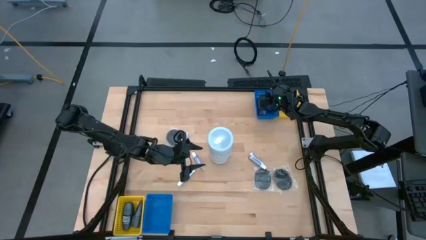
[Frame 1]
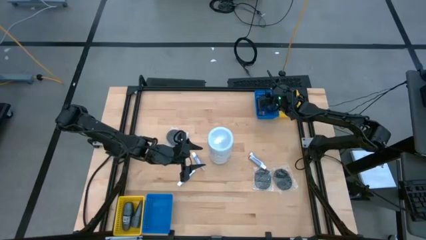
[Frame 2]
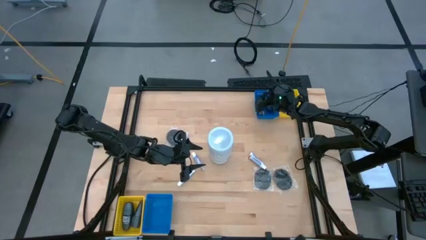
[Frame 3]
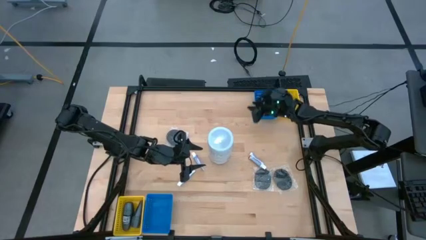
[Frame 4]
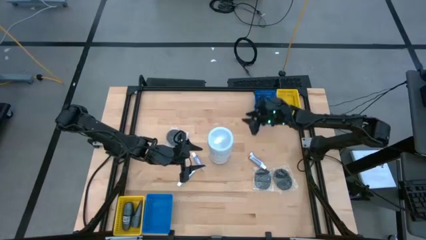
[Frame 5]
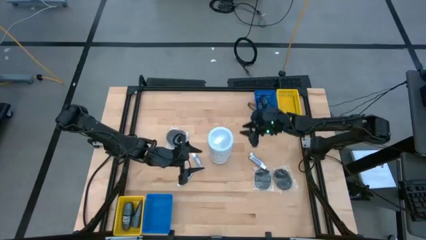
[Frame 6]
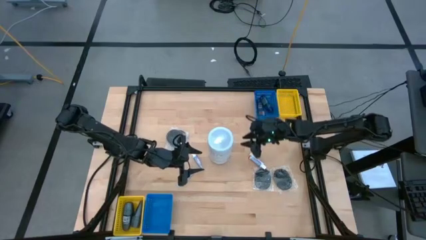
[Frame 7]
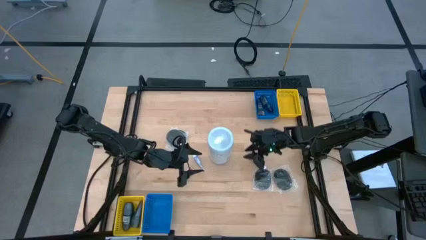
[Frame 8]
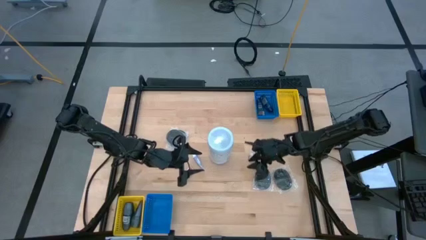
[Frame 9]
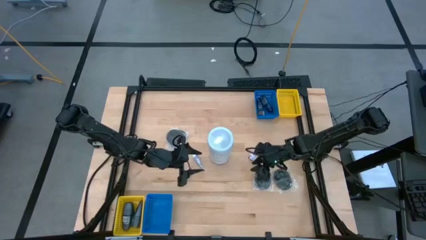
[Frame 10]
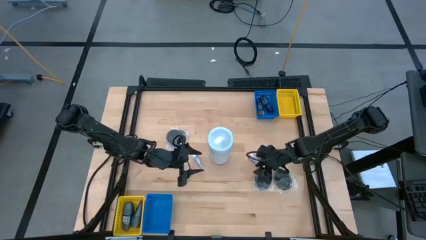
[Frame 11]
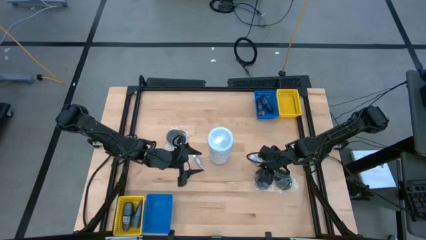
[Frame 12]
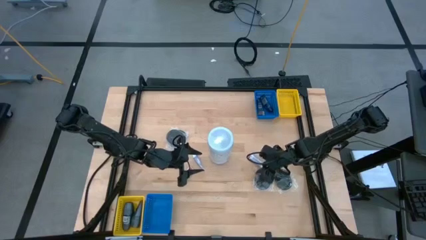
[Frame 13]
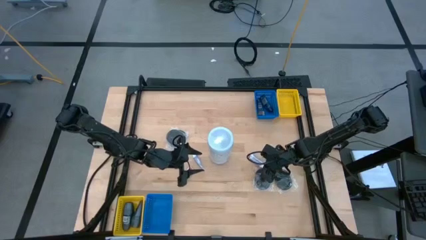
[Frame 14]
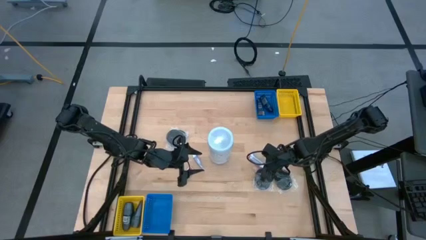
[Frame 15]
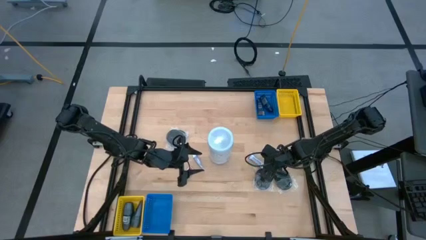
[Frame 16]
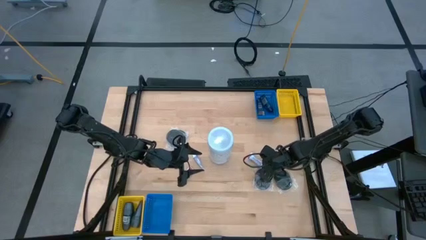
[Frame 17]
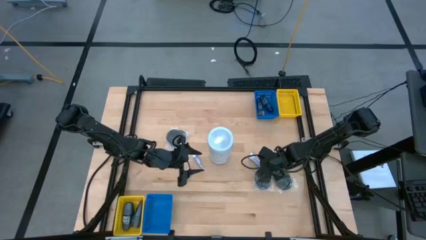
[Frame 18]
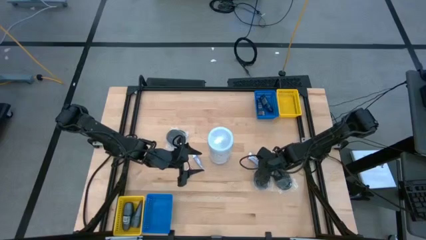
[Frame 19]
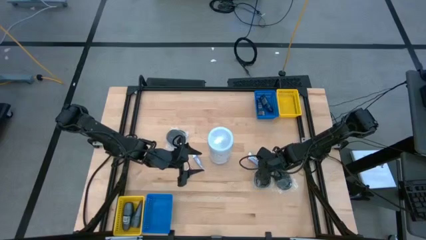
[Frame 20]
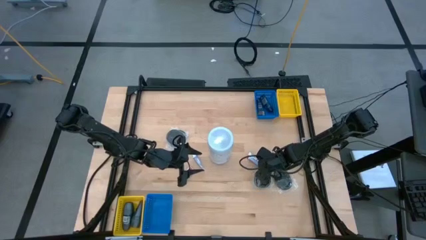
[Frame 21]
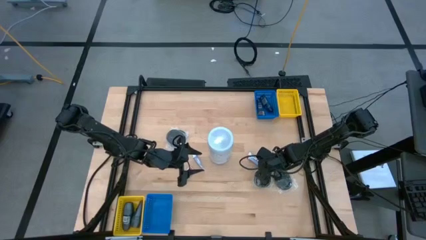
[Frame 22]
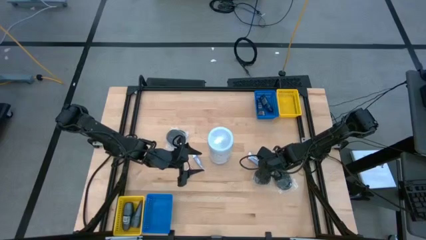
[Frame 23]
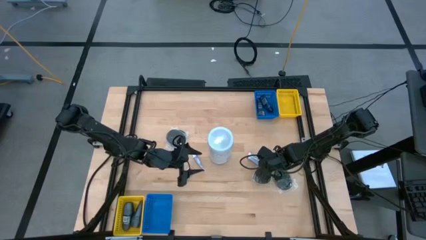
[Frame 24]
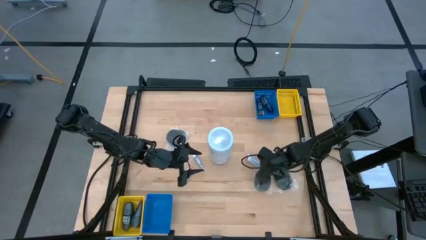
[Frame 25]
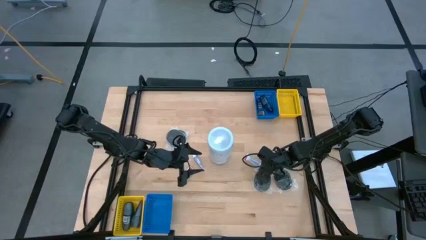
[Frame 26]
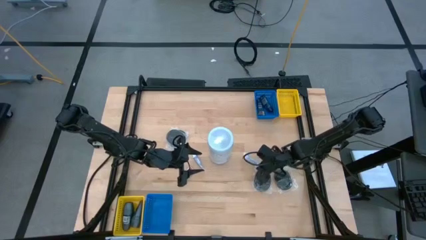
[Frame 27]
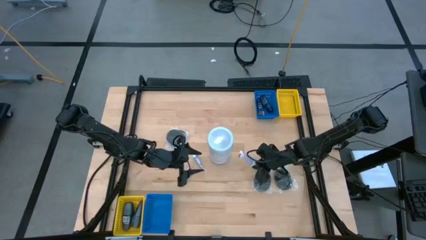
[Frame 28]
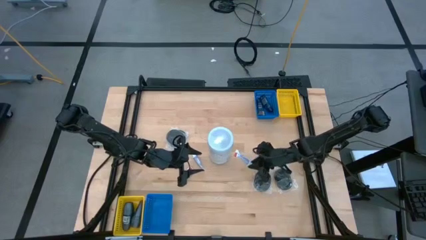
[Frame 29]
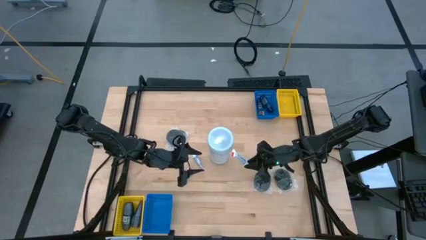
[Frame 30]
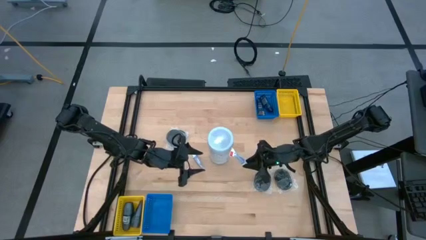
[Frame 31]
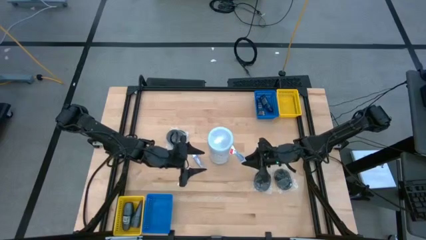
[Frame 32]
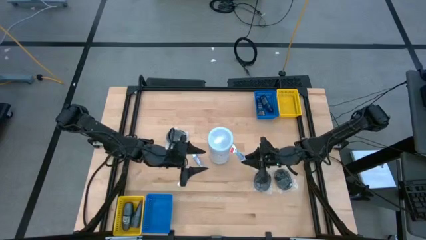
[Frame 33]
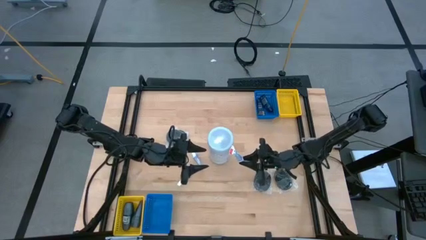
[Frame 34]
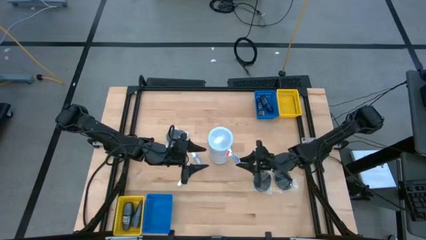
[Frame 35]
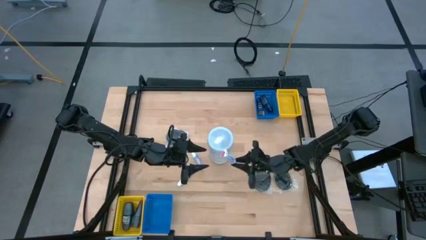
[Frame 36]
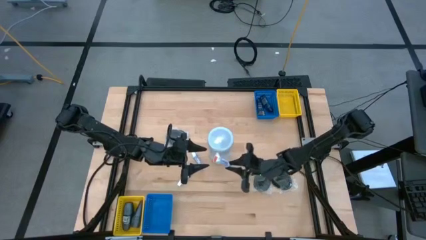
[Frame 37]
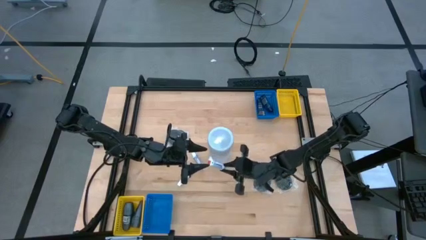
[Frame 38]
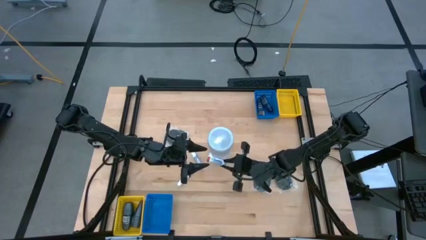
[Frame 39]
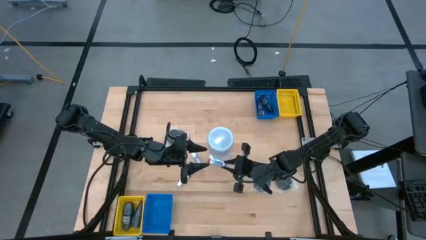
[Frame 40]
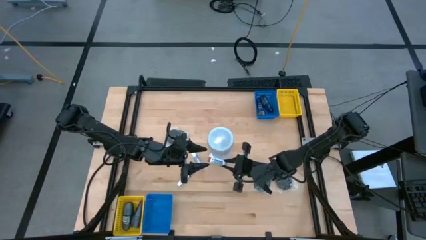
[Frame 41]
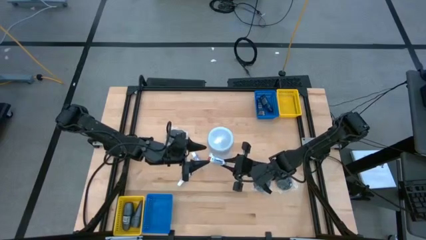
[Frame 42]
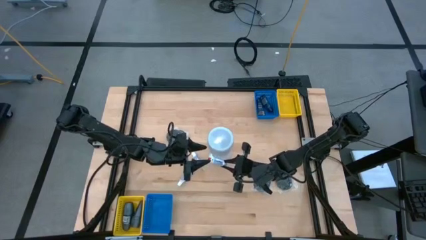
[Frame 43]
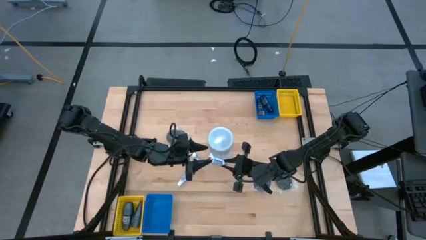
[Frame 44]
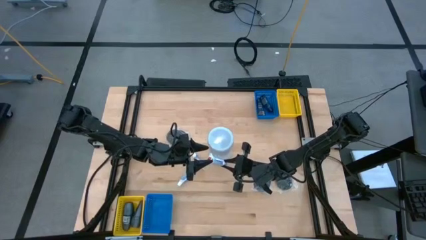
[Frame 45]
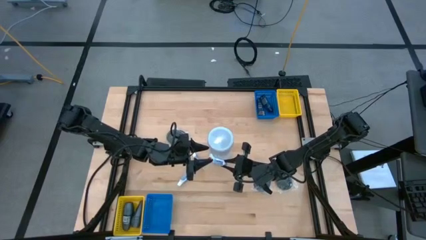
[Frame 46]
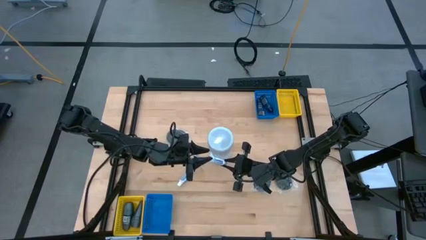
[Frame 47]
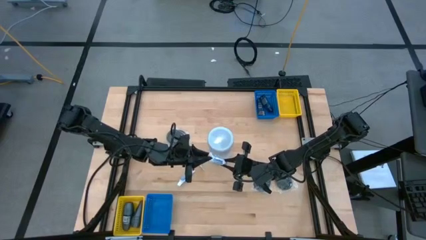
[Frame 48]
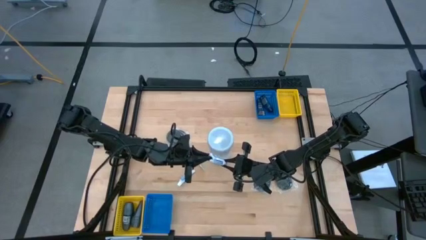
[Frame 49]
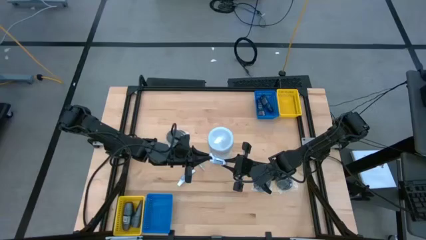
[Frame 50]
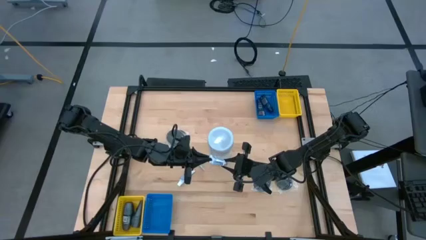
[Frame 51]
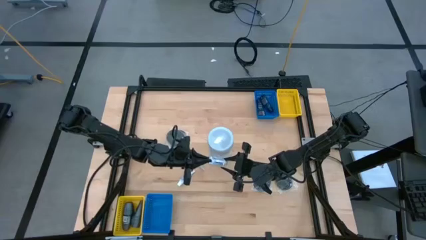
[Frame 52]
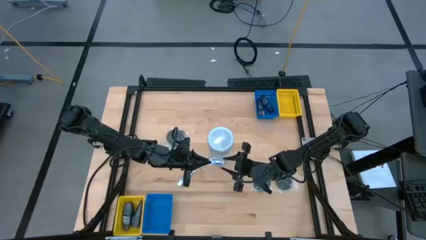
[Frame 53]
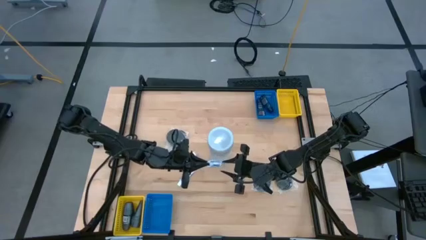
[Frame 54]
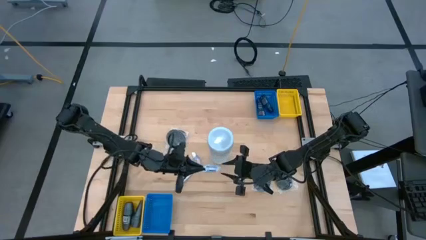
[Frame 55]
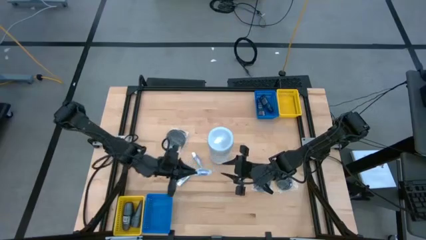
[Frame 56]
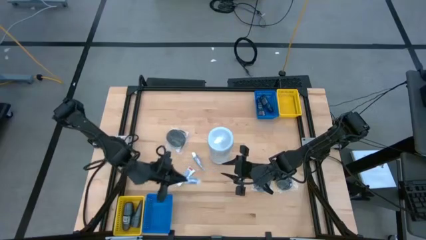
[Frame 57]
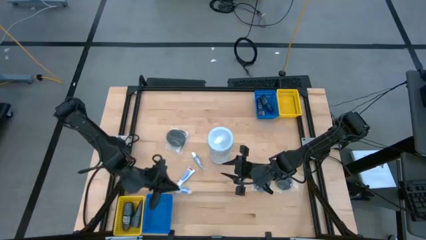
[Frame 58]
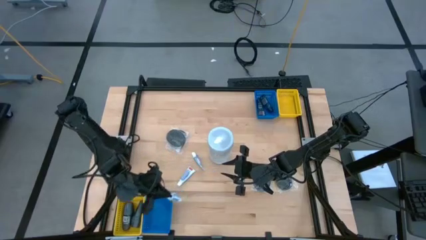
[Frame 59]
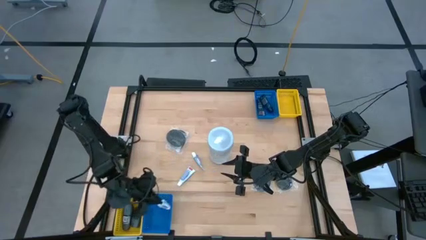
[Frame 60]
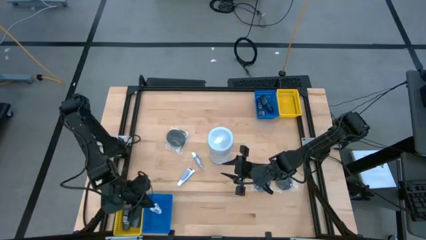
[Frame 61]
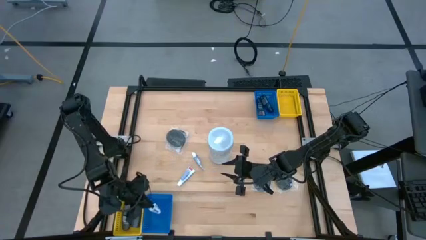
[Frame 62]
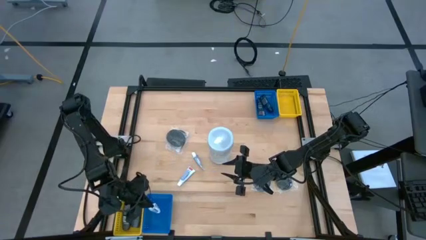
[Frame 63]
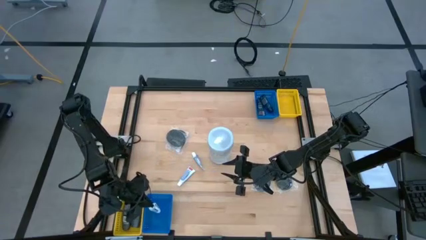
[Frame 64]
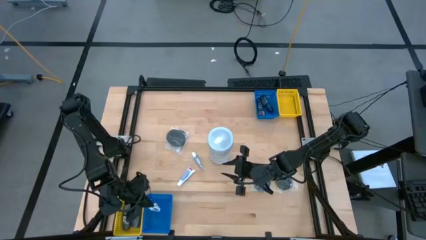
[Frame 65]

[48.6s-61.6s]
Task: Pick & Place Travel size toiletries
Put the top right white toothpaste into the bottom blue bin

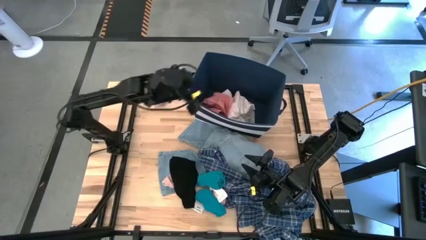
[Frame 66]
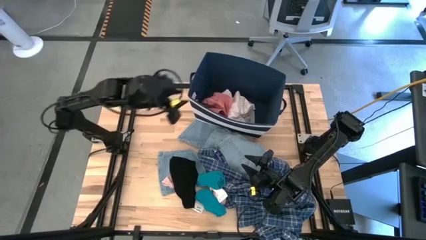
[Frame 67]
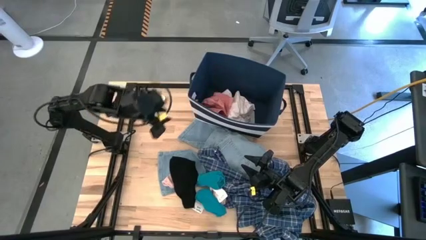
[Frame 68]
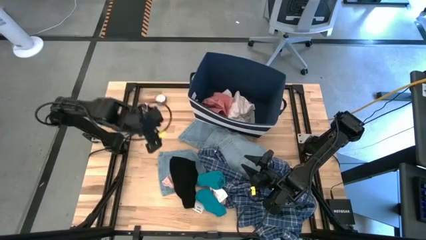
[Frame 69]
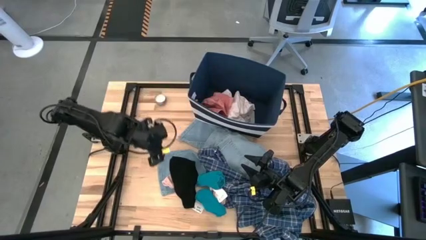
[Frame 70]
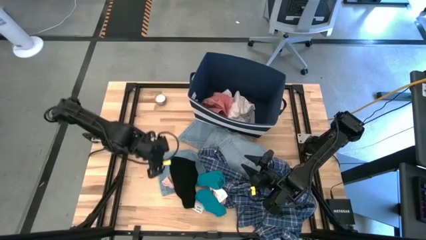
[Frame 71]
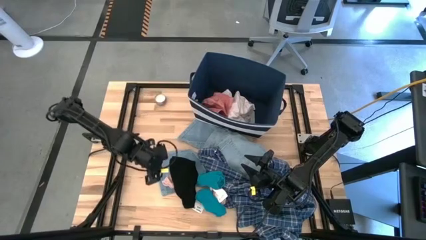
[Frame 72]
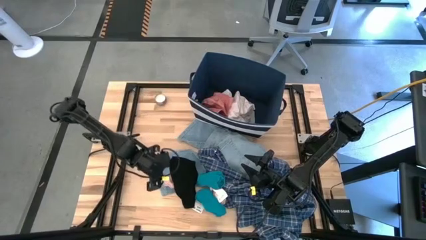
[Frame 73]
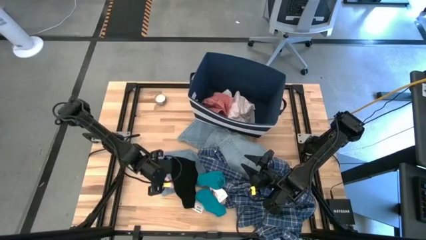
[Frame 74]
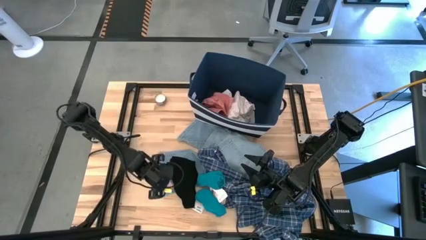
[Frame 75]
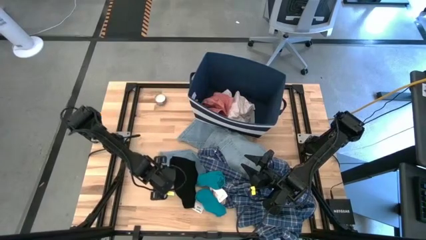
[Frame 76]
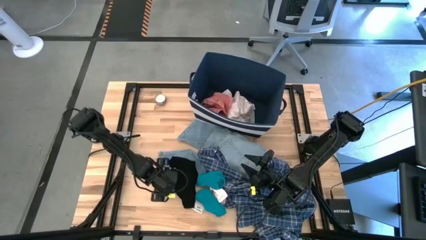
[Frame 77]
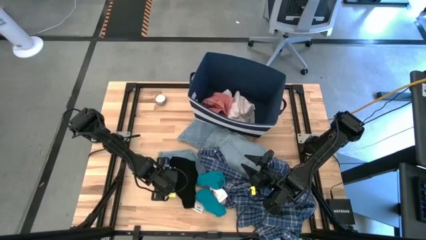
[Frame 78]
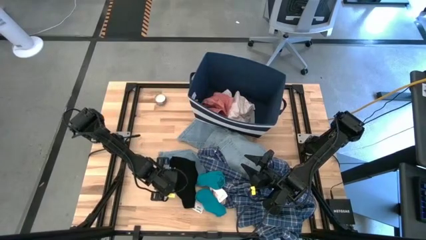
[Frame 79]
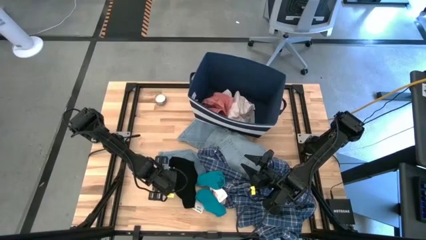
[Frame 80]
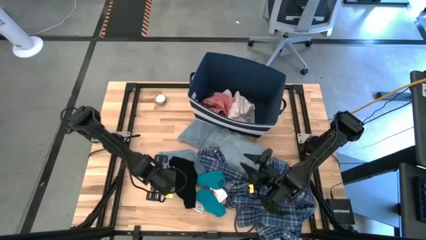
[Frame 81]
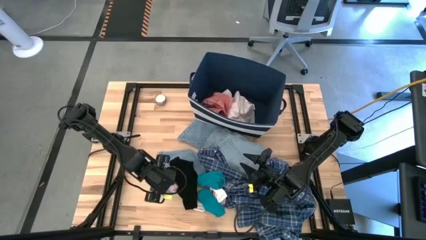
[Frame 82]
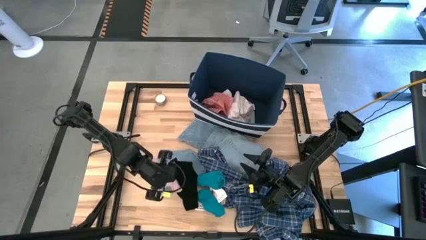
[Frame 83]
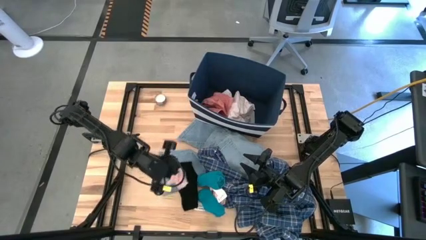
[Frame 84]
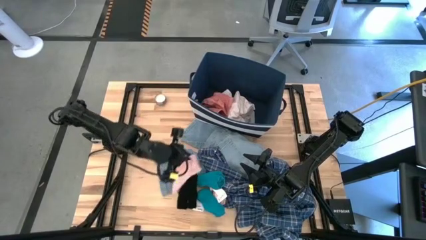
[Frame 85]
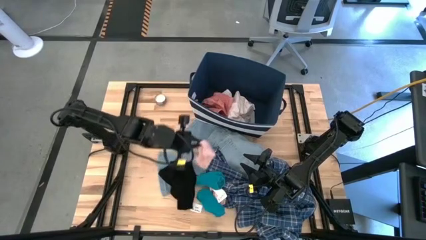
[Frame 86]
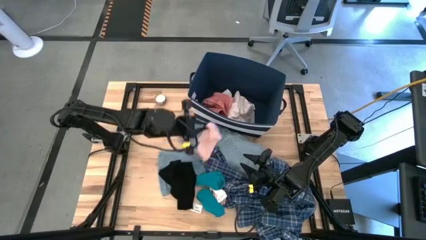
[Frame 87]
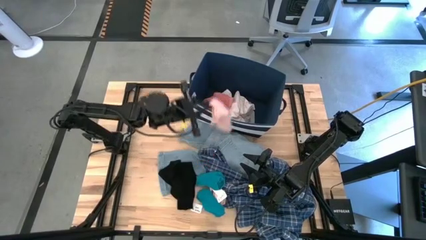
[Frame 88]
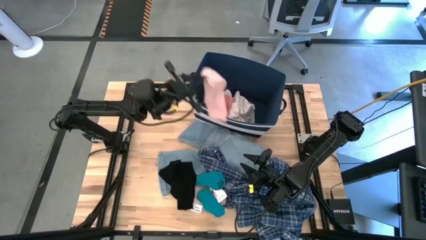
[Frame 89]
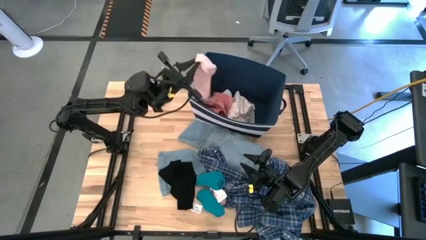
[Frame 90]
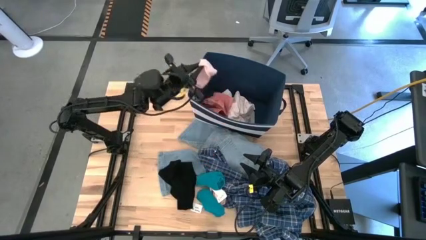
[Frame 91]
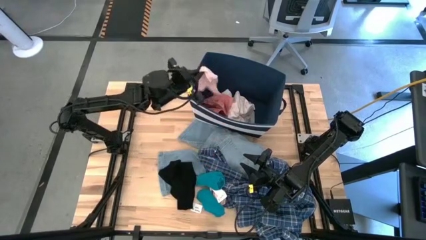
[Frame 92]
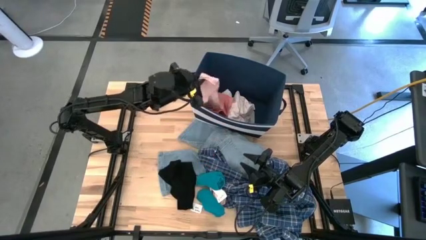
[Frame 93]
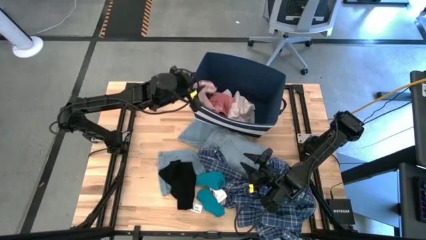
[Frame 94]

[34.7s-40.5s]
Task: Sort clothes
Put the left pink sock into the blue laundry organizer
